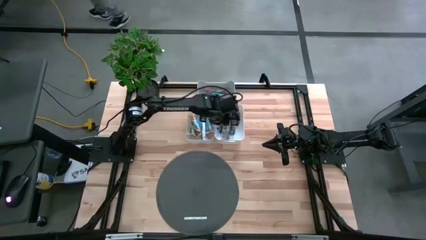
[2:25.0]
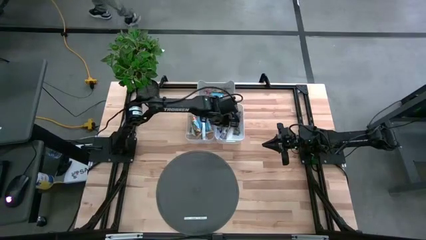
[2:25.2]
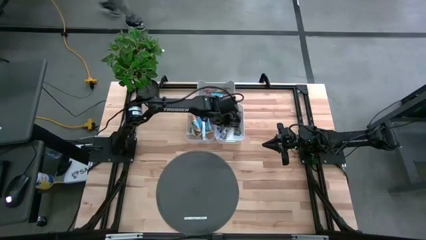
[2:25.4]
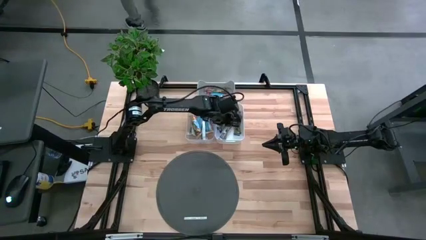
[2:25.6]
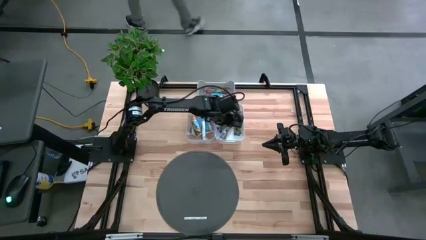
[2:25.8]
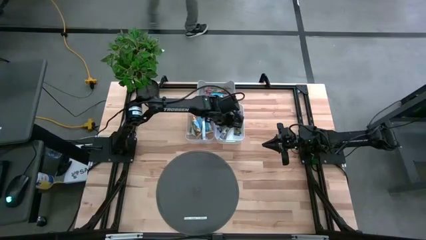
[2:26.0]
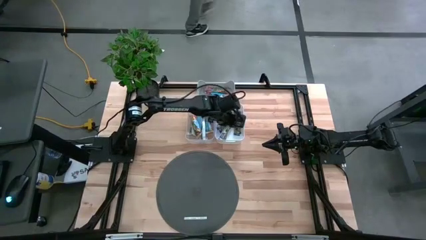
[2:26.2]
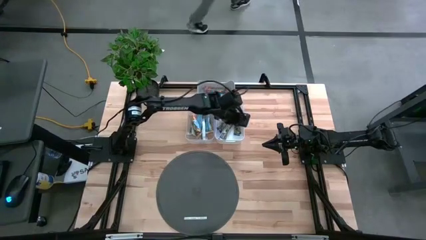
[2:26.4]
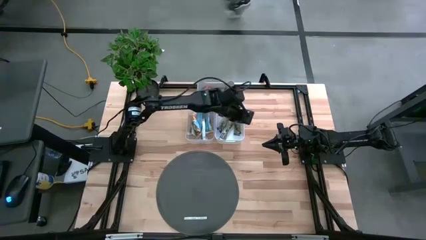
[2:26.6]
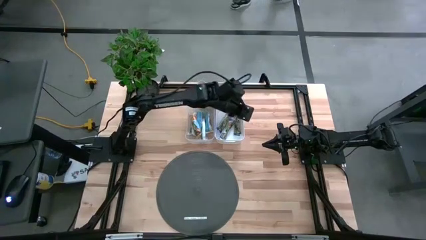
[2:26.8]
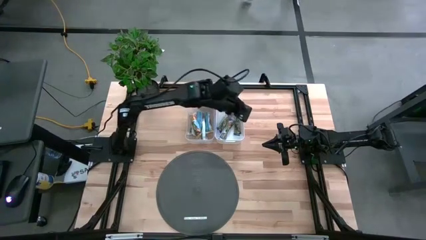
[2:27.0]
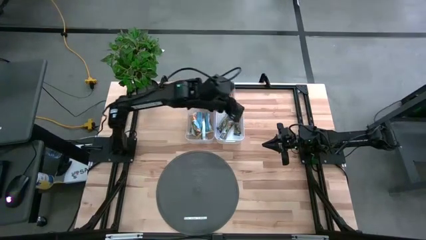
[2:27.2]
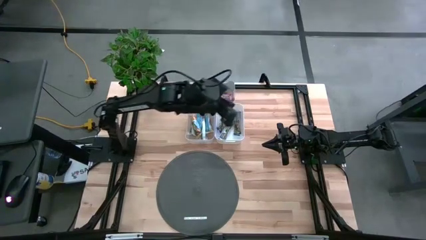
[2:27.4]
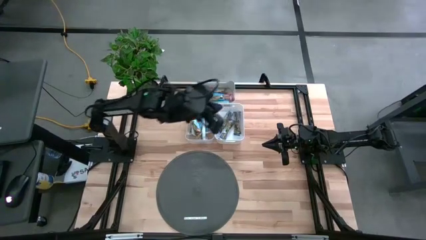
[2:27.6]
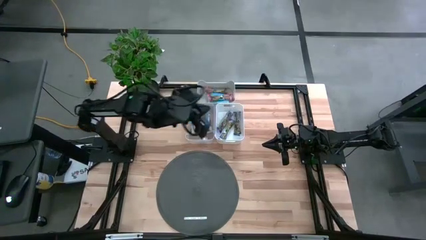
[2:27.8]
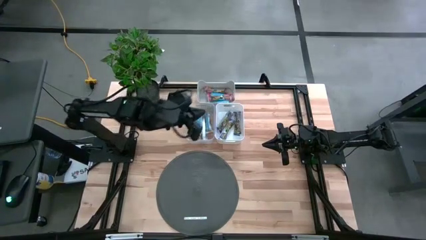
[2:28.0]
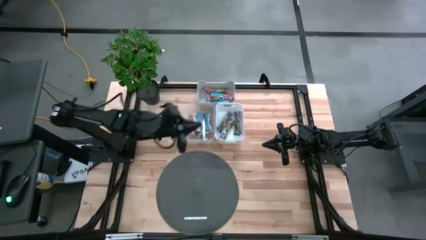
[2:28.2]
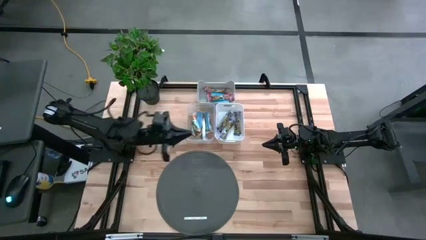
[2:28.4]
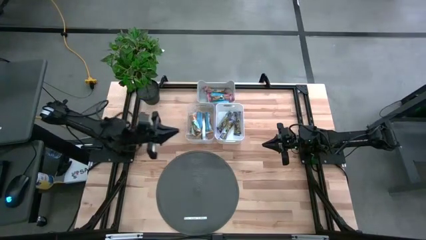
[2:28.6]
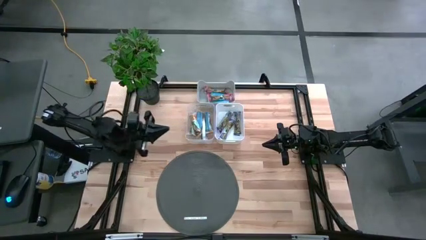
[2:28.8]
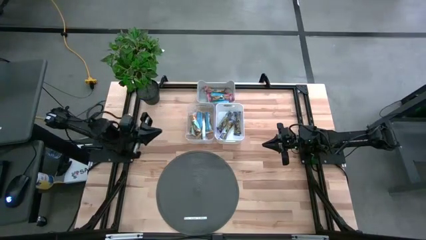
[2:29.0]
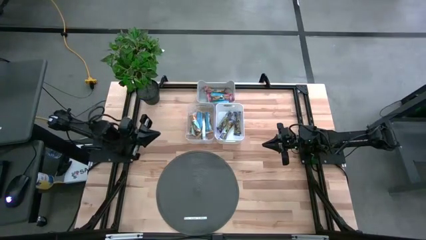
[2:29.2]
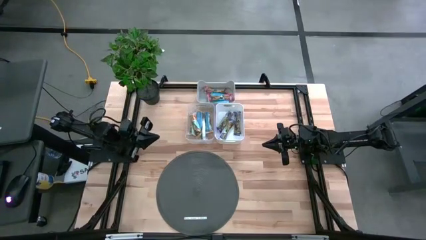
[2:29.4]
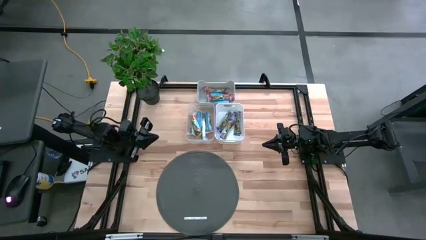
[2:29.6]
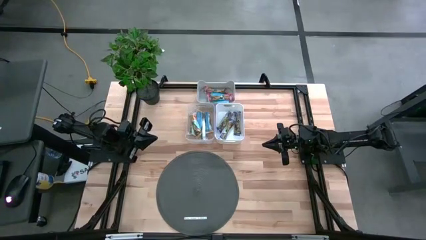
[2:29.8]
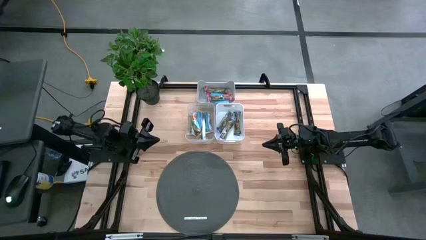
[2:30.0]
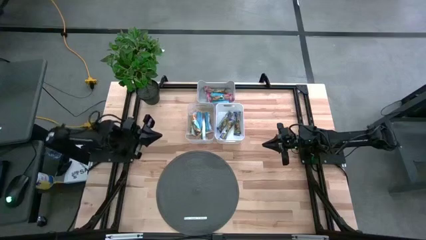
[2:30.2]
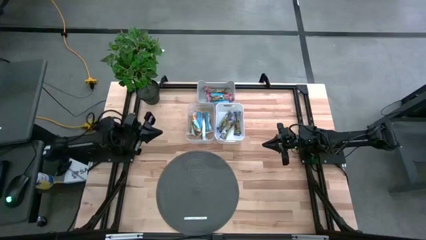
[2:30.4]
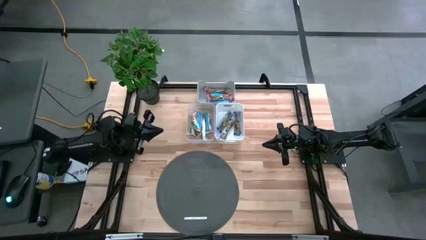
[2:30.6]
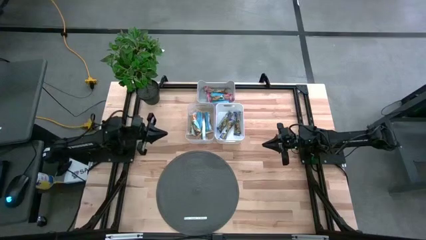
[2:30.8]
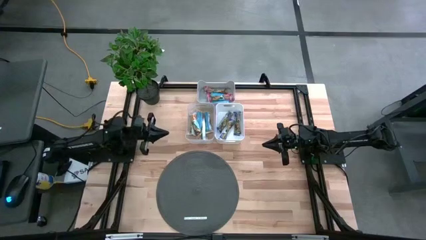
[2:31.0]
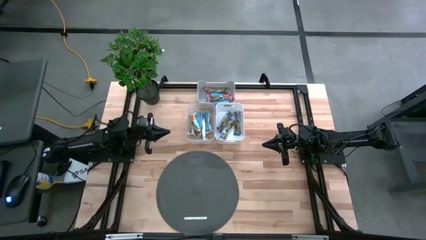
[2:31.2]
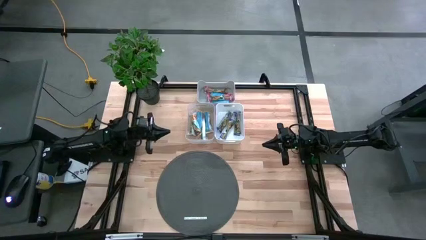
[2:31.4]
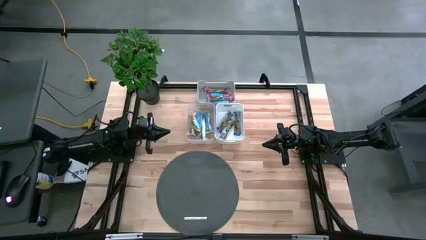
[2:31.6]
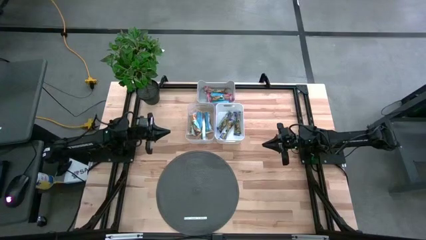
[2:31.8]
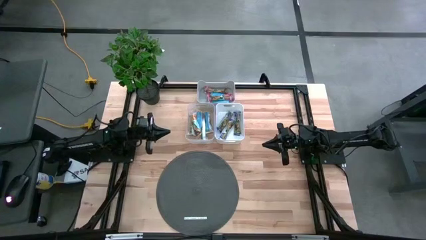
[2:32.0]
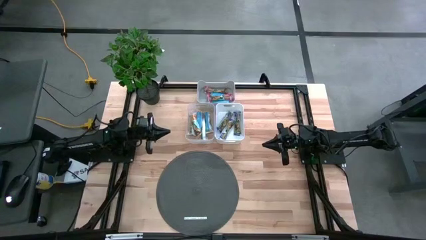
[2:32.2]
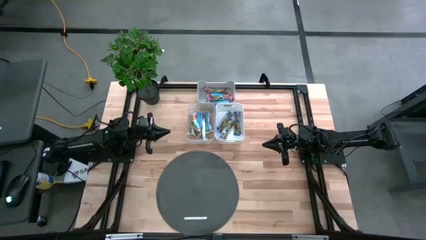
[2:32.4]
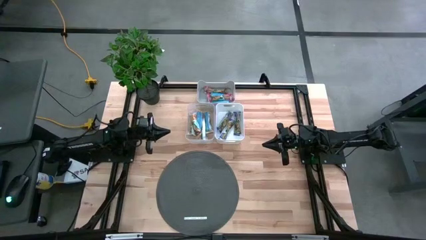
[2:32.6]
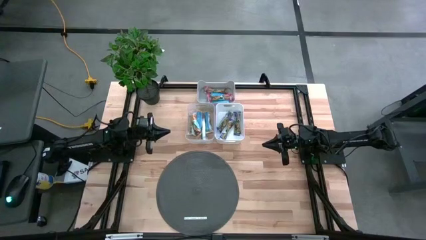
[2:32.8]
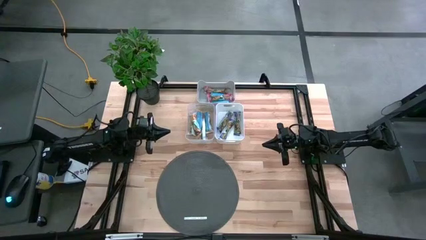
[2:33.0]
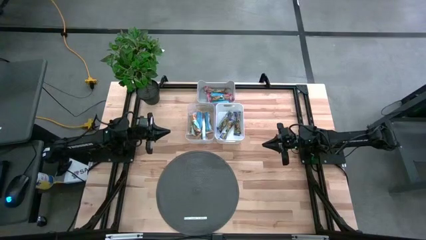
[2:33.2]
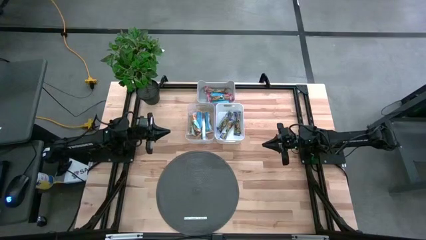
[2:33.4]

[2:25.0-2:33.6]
Task: Pick and place Granola Bars by type
Return to Home Position

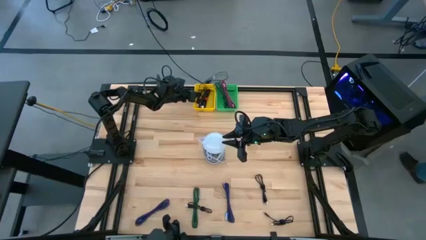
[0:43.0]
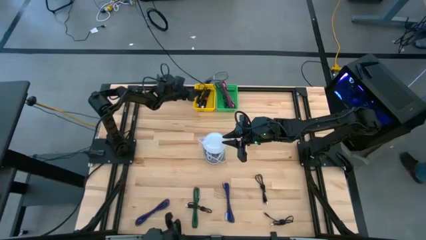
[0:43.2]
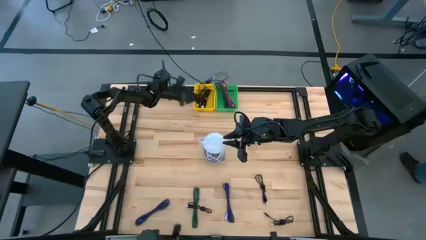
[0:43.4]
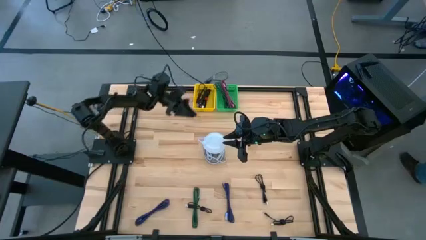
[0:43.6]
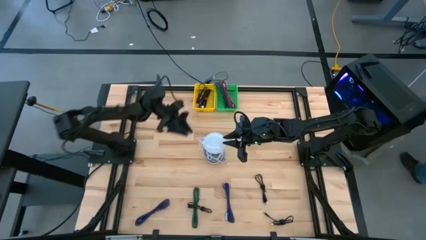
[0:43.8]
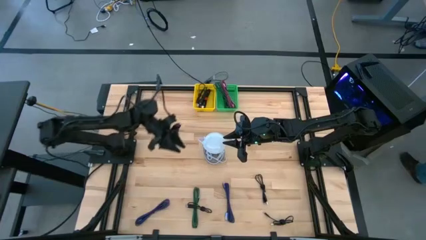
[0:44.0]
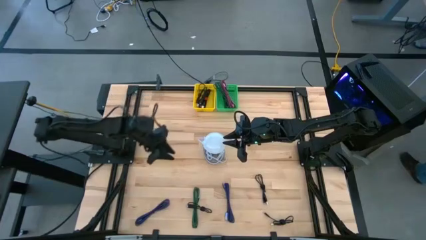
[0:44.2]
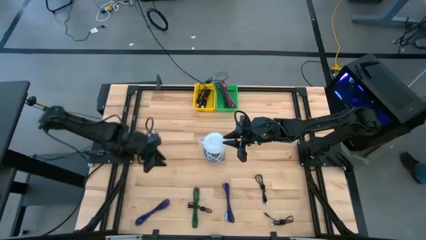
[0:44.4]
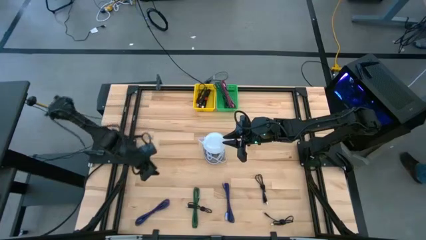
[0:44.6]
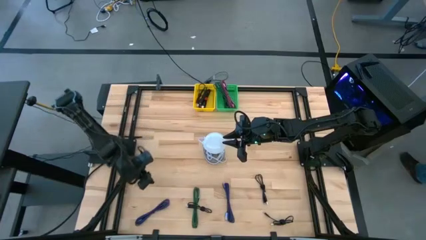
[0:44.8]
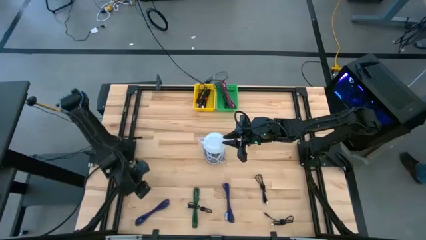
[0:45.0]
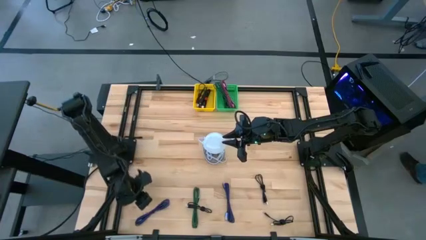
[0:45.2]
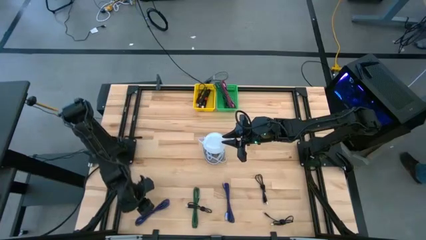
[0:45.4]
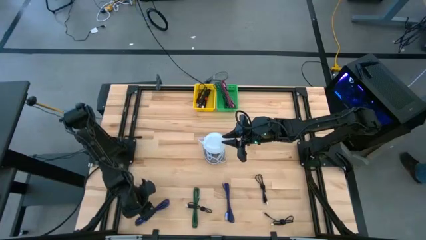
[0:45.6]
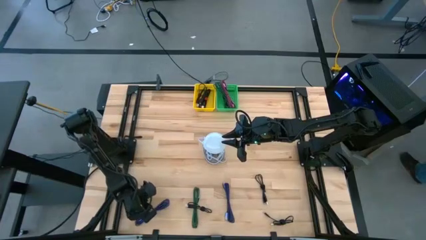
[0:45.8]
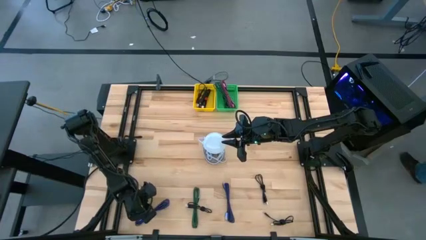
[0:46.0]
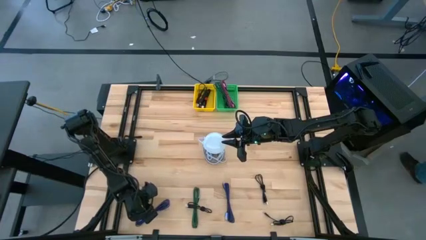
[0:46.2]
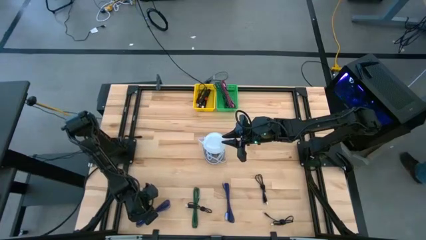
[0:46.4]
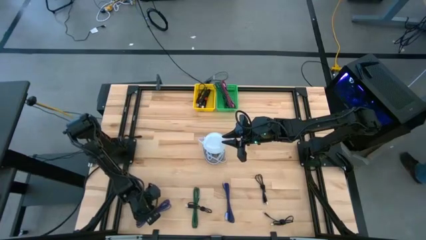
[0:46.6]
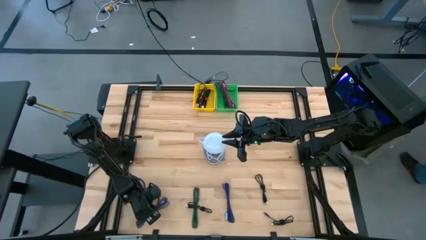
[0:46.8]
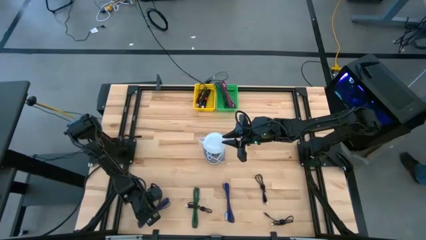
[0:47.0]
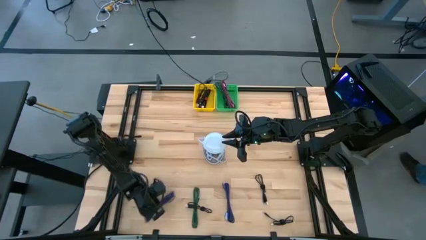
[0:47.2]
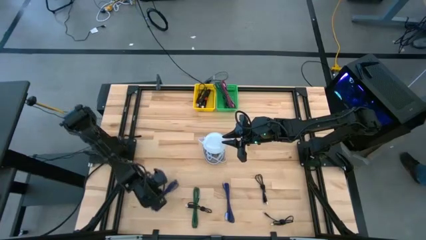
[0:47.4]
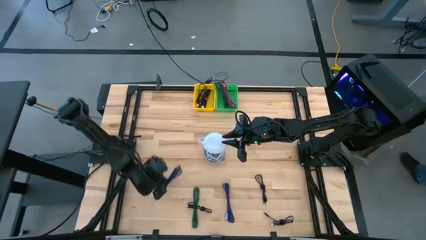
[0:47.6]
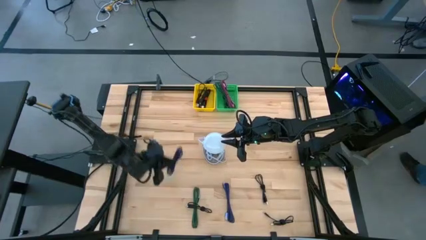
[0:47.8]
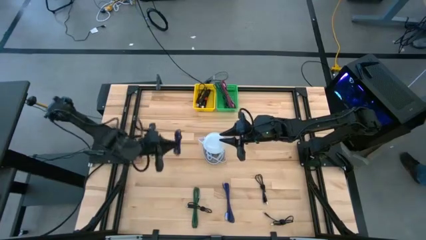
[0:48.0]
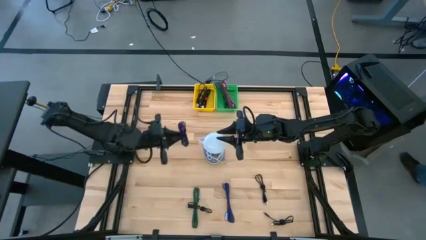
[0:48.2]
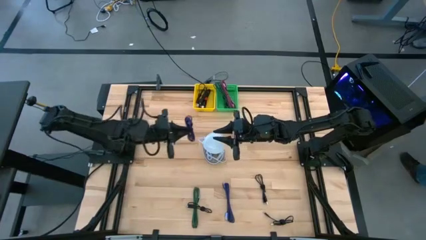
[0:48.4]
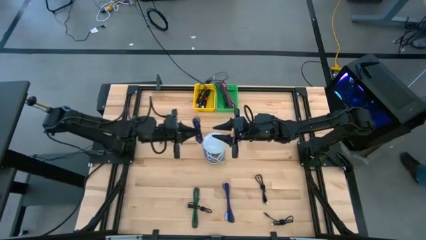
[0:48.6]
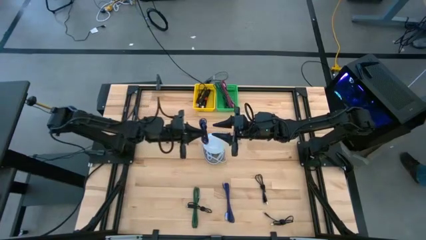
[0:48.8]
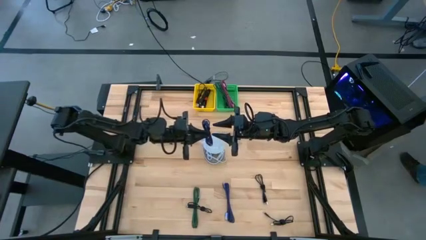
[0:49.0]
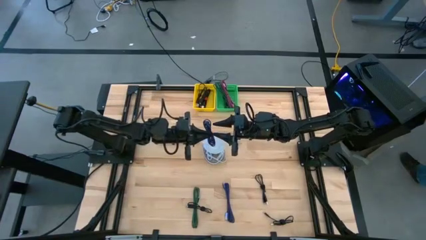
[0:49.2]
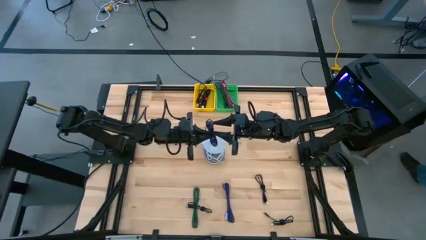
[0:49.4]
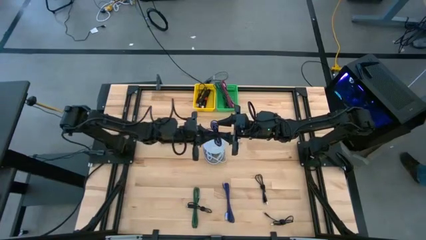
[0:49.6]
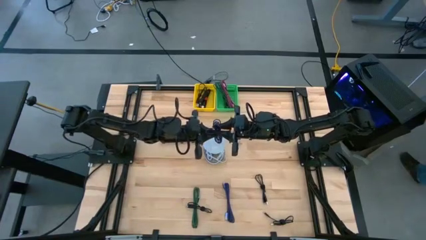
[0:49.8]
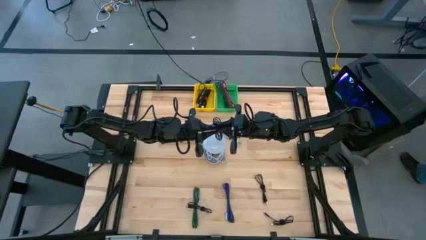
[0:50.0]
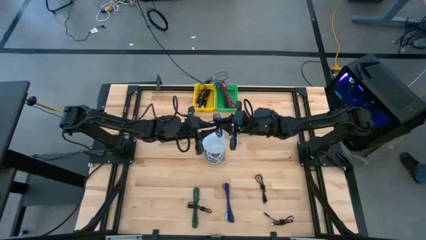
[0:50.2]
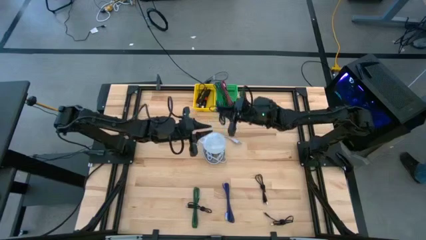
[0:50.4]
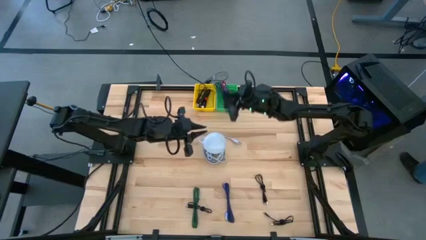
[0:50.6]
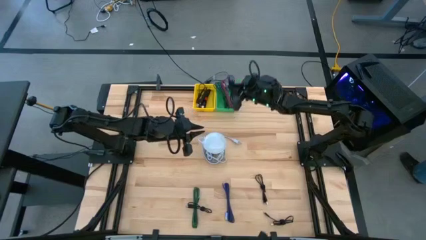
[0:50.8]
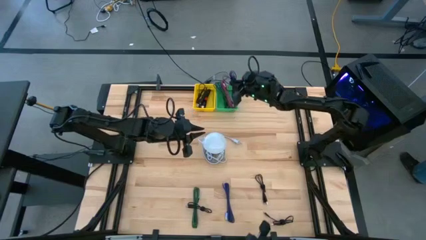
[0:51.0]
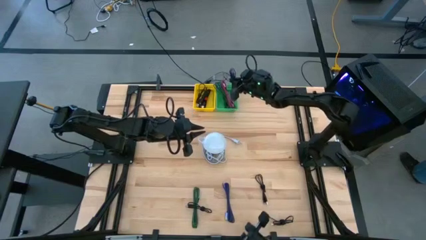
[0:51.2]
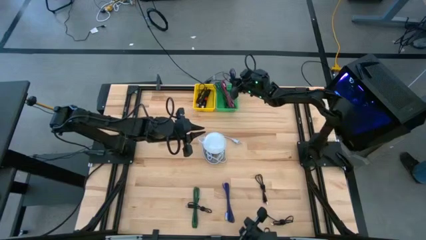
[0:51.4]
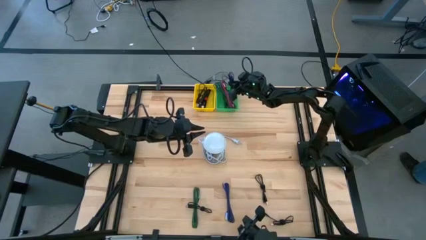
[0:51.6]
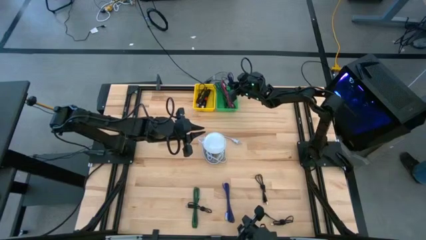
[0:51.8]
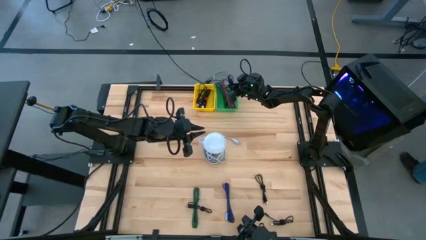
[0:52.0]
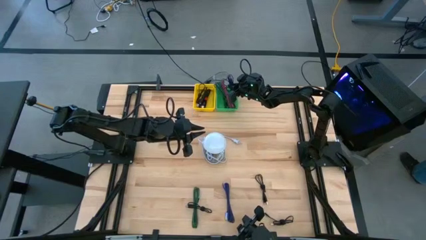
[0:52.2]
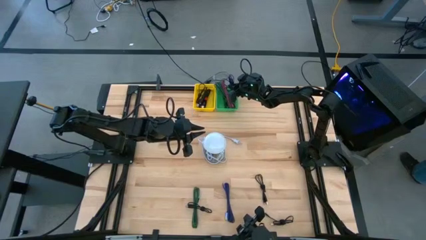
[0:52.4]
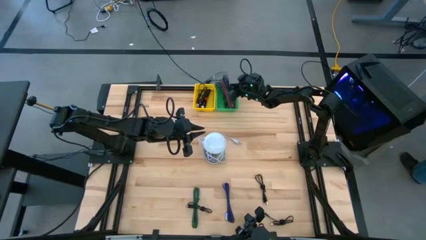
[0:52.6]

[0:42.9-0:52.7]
Task: Pick & Place USB Port
Put the purple charger cable into the green bin
